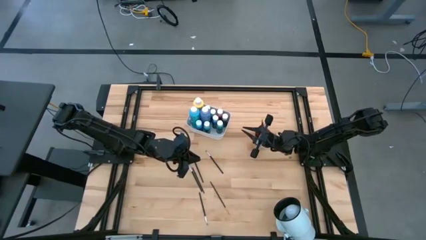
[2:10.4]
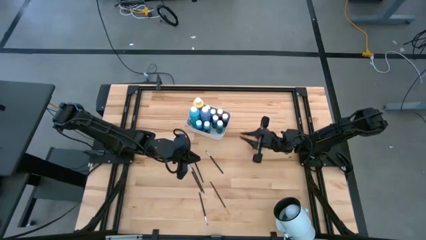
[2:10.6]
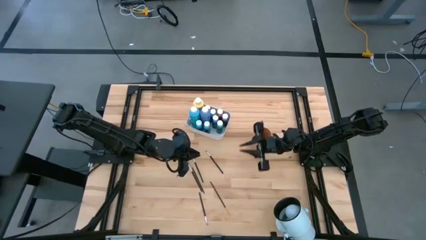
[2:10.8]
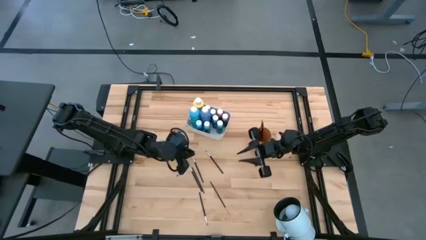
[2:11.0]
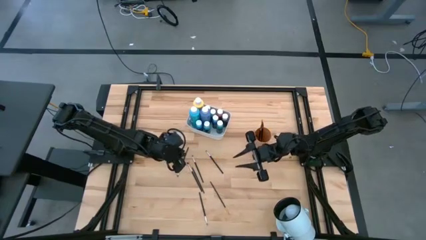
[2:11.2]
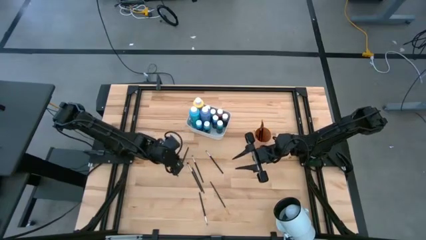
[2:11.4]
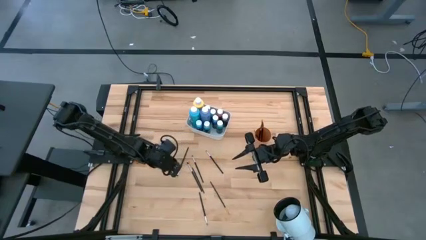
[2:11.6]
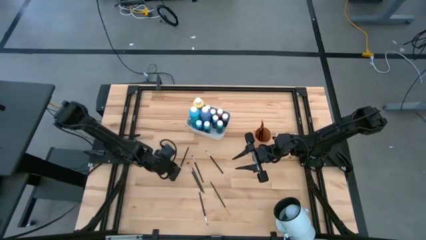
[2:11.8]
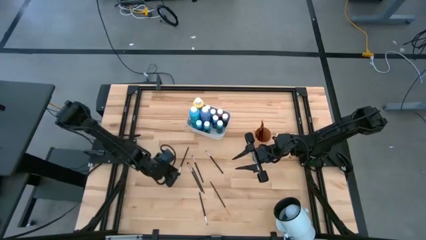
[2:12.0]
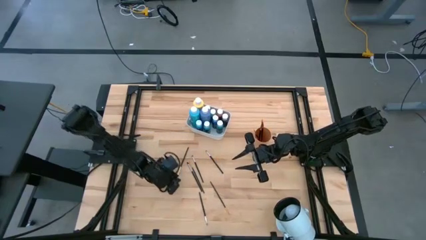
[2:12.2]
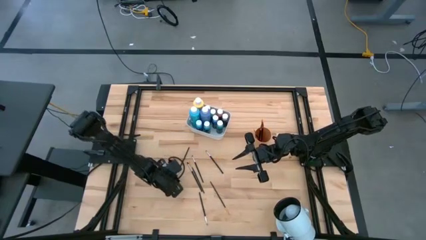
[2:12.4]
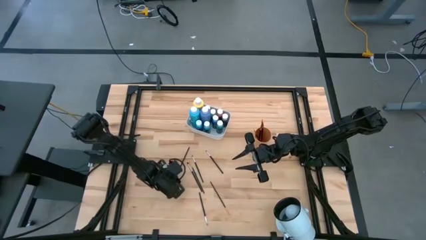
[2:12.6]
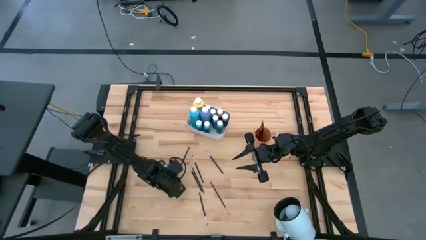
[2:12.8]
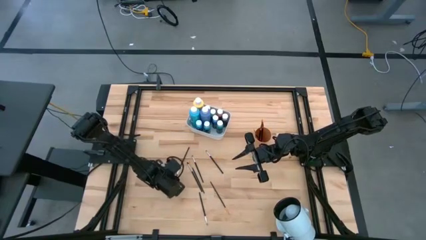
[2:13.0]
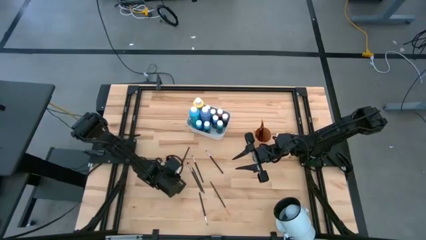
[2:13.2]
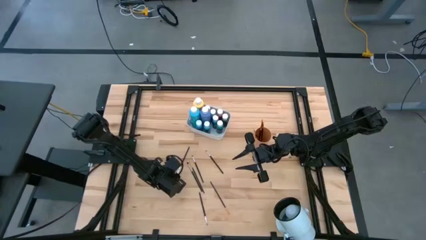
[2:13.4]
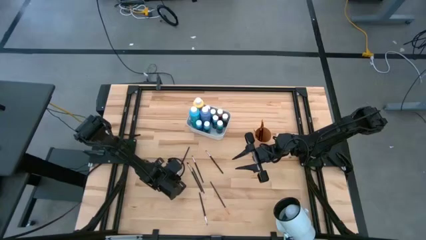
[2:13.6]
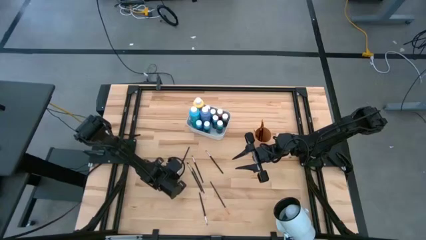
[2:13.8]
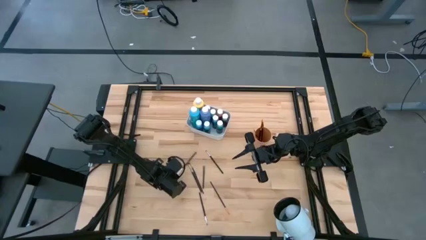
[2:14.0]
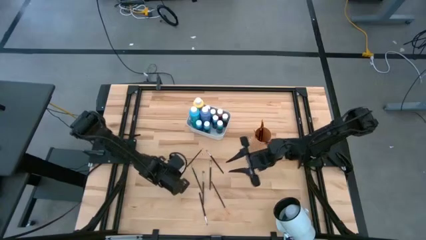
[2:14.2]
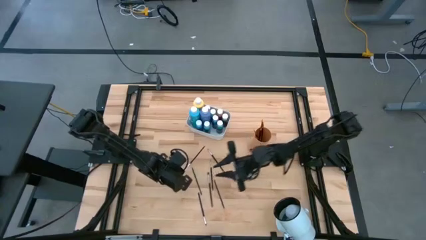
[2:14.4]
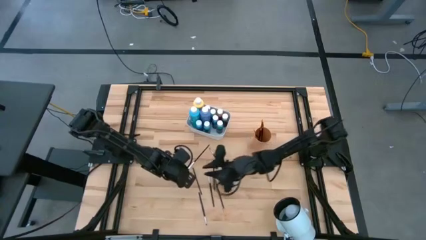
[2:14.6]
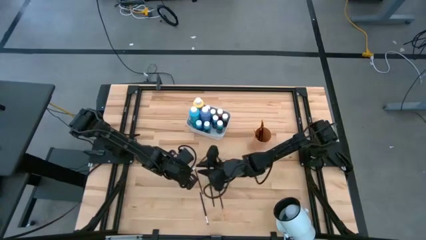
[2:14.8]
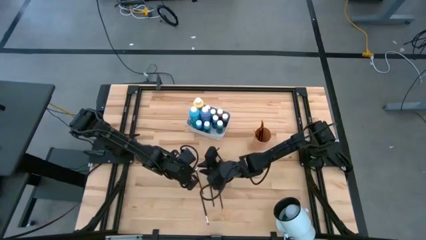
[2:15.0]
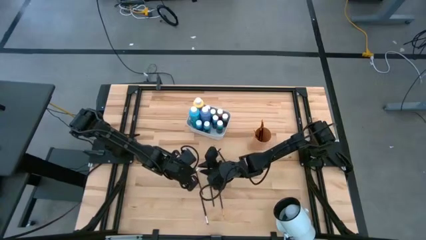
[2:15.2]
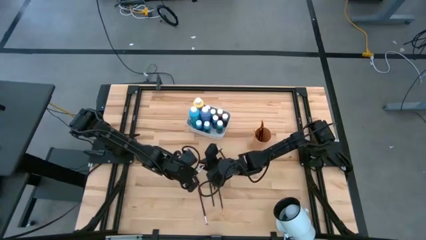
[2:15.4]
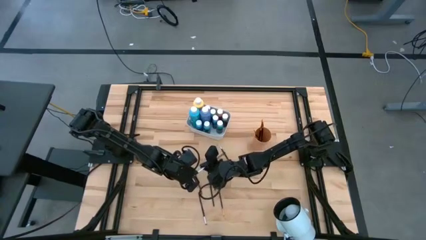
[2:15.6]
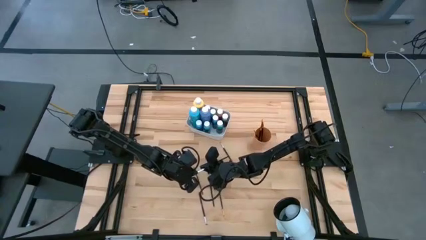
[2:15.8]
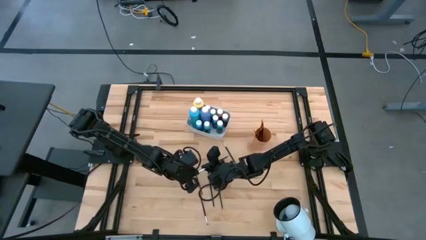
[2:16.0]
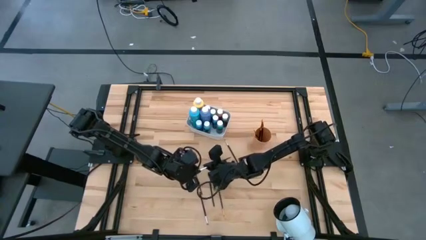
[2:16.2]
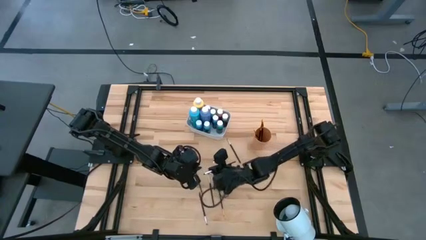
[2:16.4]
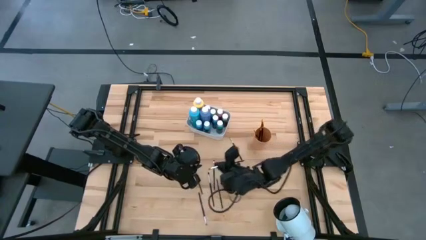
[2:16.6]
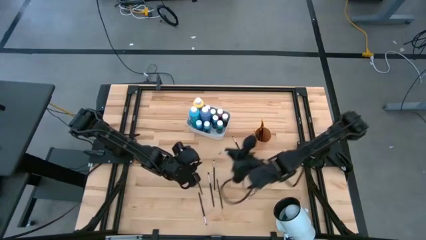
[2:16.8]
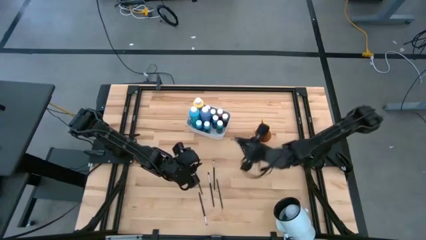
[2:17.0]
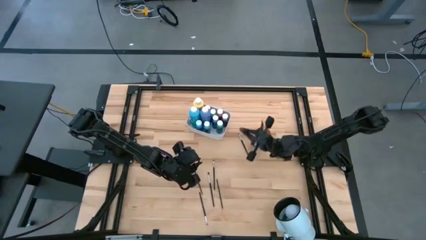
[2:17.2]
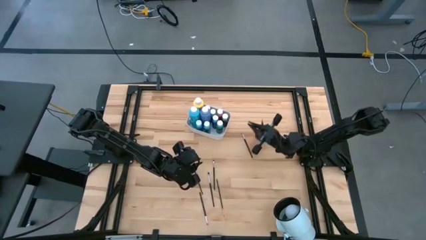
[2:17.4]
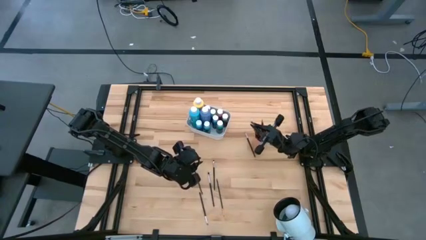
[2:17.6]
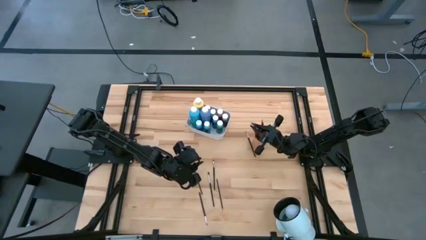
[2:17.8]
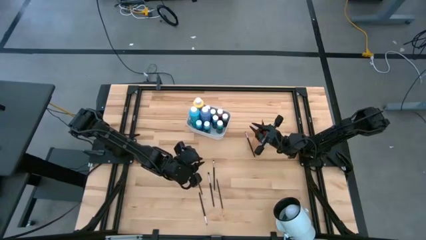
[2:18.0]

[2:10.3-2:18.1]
Task: Pick & Place Paint Supplies
Put the silver paintbrush into the cup

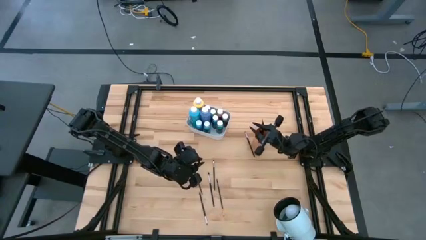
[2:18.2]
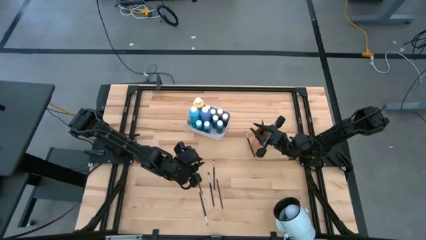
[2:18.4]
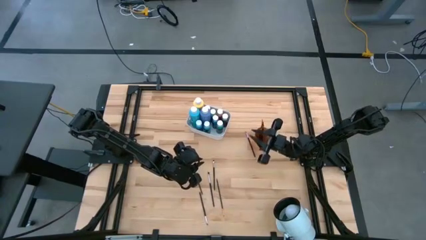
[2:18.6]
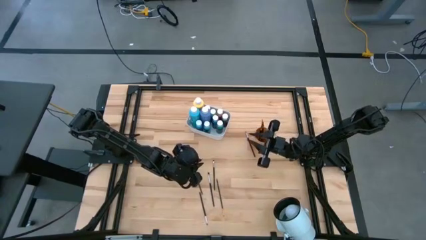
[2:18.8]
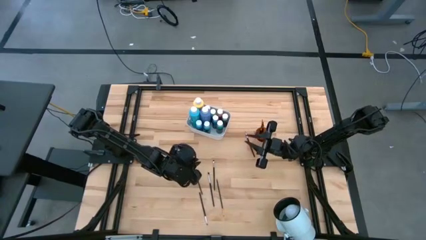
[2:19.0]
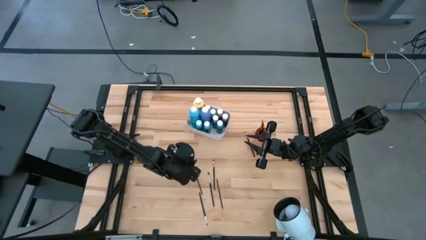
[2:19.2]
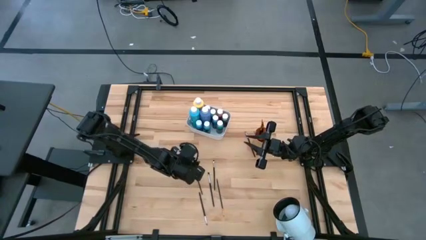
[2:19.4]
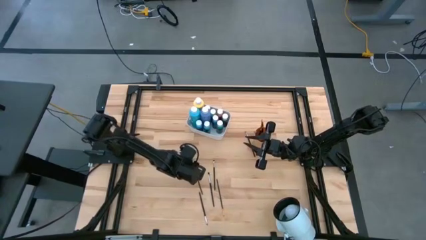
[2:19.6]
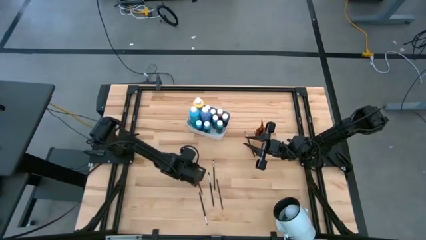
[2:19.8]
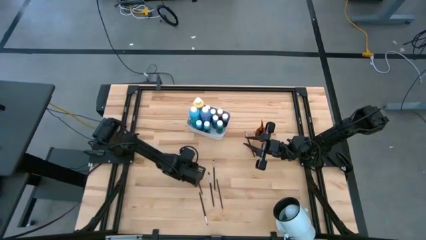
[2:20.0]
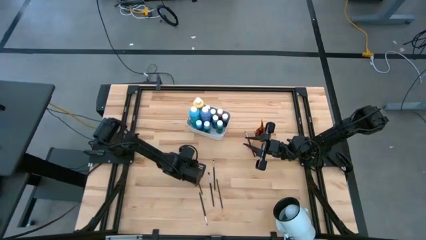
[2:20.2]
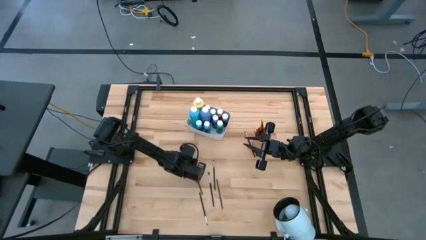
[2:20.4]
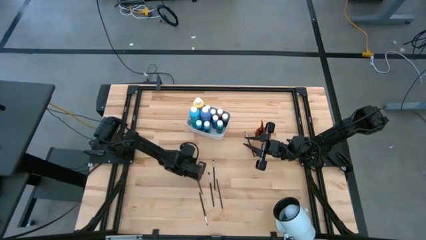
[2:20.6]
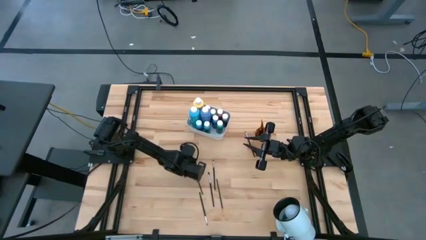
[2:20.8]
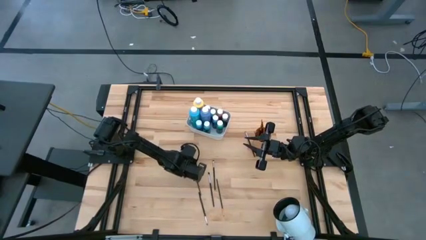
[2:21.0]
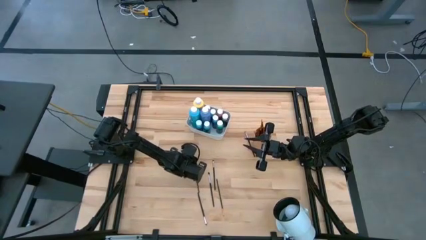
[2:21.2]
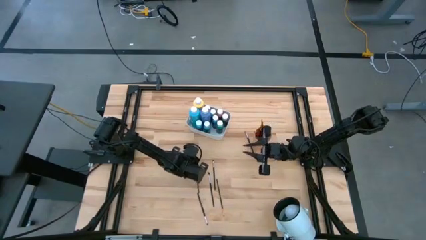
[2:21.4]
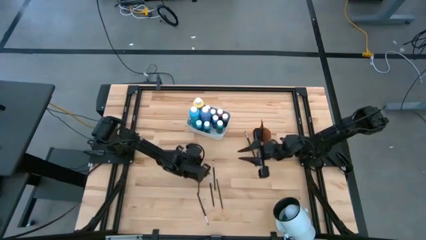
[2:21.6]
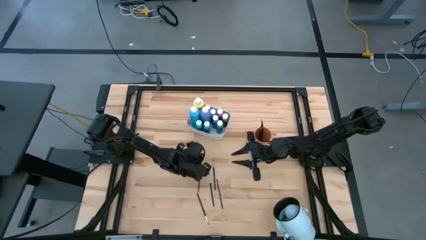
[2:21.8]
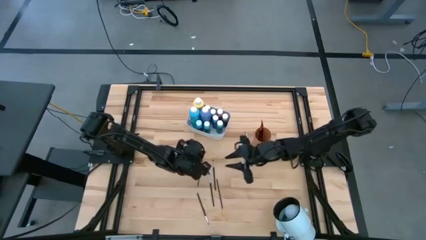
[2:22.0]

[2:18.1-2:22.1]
Put the gold paintbrush into the cup

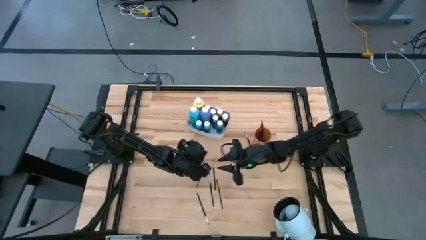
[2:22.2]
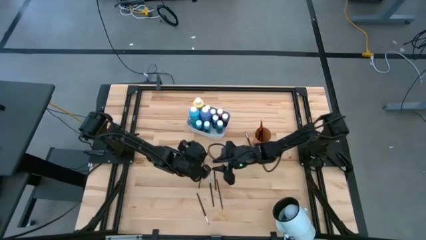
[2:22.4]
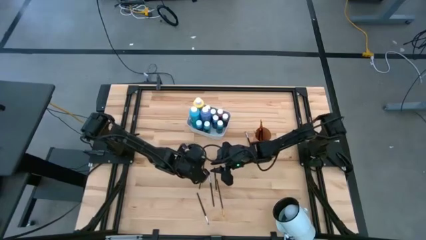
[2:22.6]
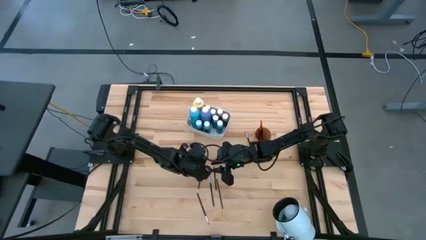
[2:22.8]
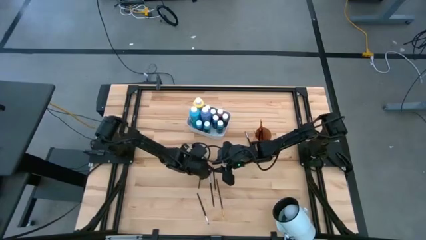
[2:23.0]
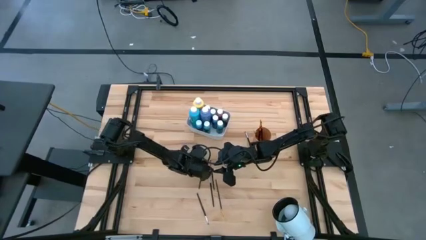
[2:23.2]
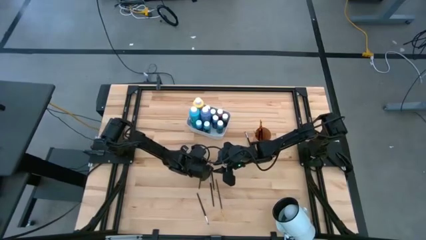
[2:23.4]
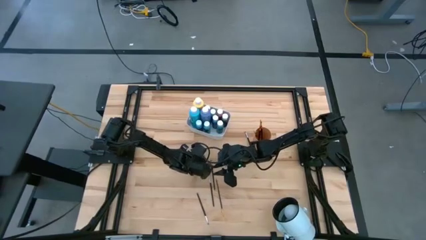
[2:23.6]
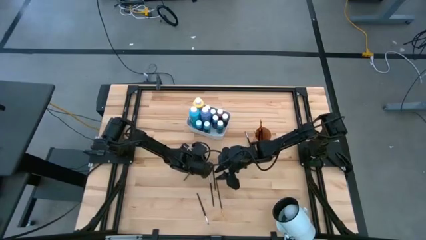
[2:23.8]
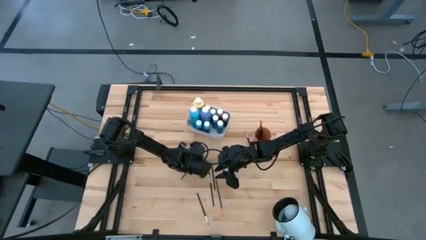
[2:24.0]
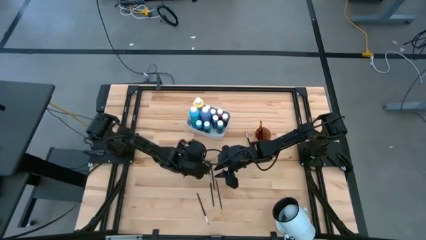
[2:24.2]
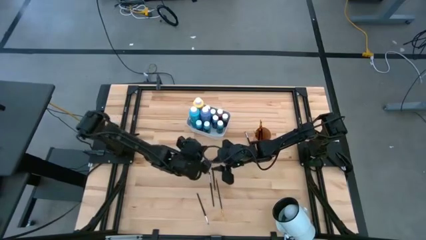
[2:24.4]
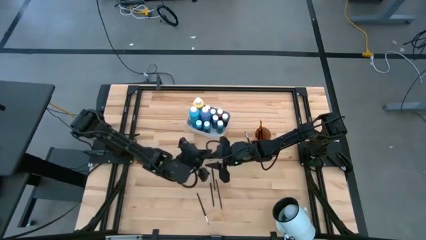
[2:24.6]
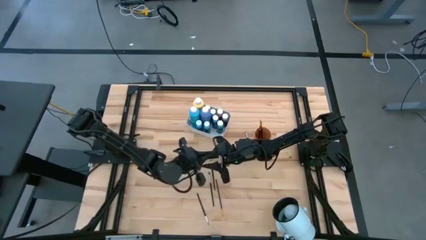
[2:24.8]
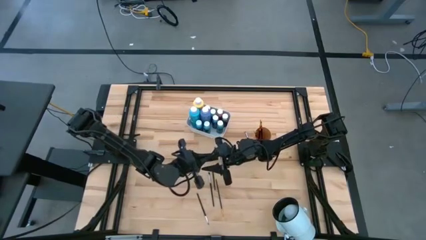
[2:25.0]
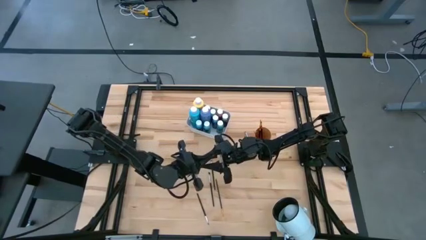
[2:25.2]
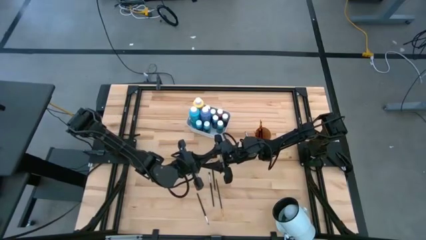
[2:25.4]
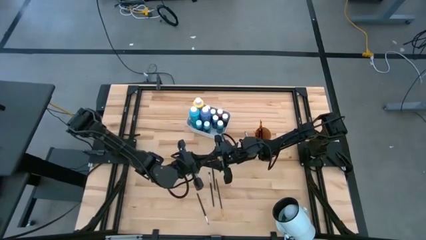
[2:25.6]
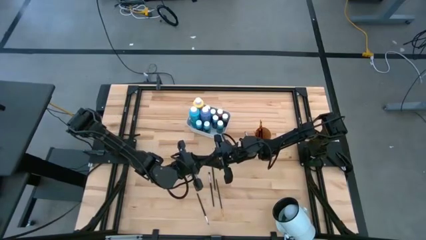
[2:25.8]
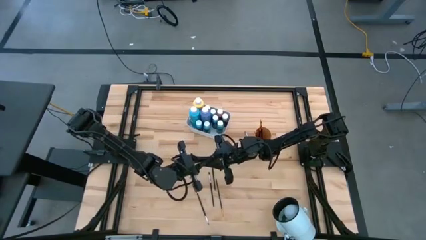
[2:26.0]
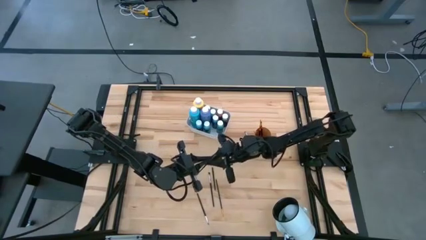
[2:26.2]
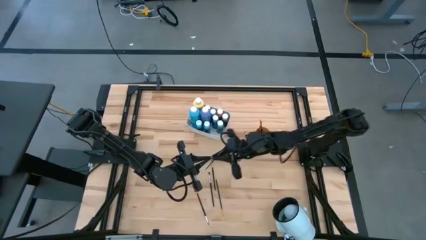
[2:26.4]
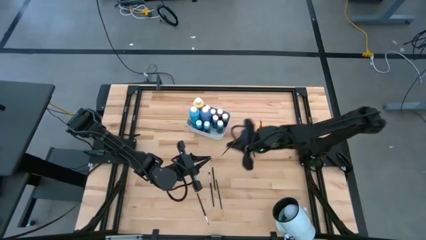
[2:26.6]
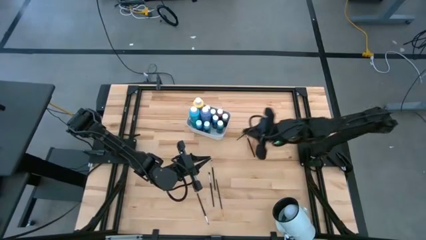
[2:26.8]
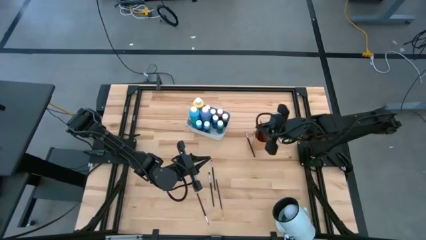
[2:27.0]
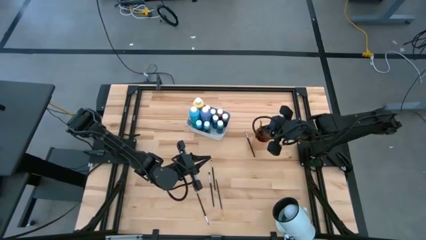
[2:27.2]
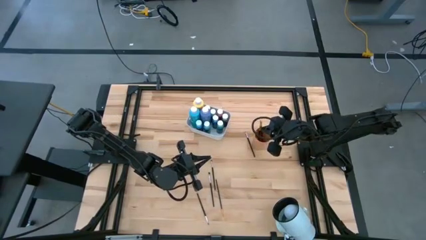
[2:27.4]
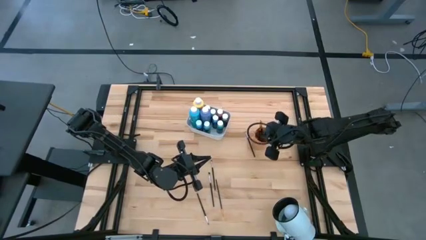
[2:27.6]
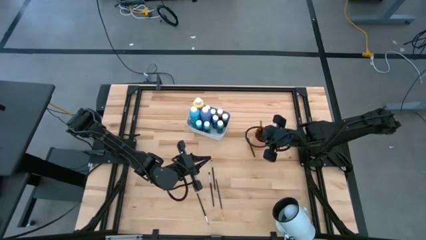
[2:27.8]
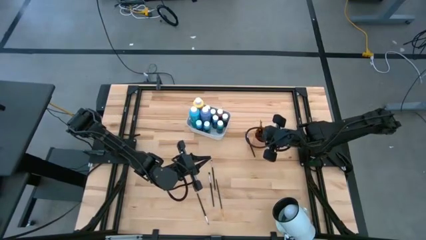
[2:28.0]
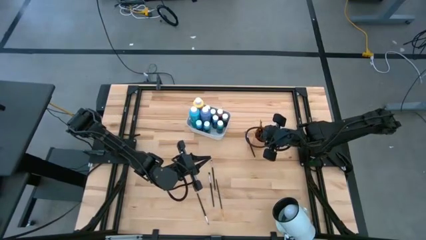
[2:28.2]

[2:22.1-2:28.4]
Put the gold paintbrush into the cup
